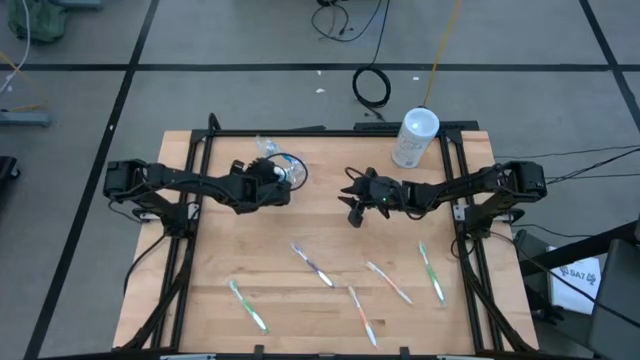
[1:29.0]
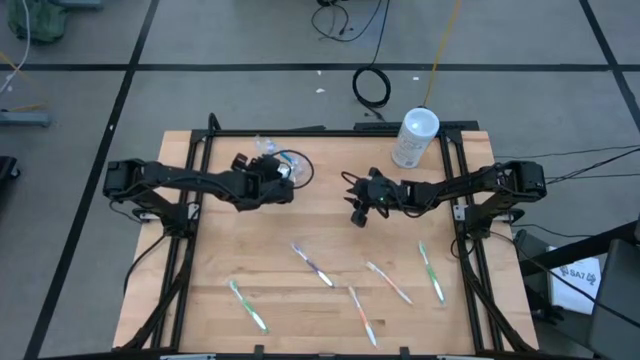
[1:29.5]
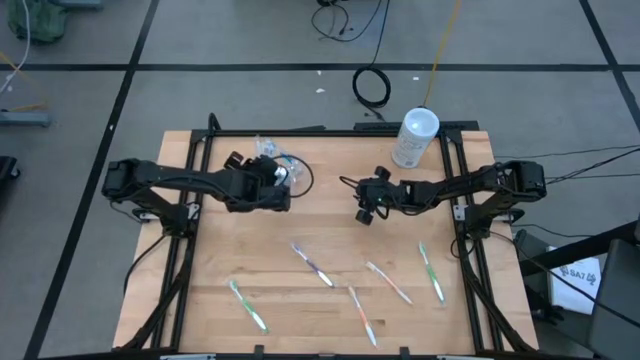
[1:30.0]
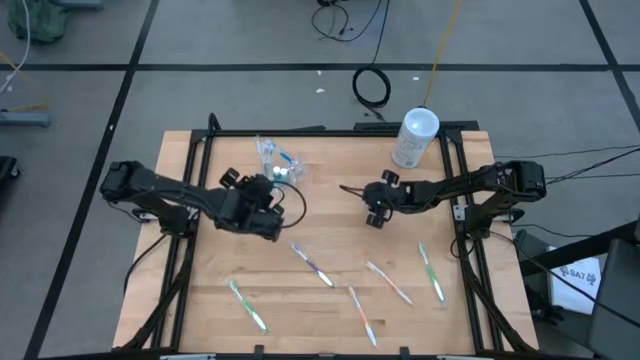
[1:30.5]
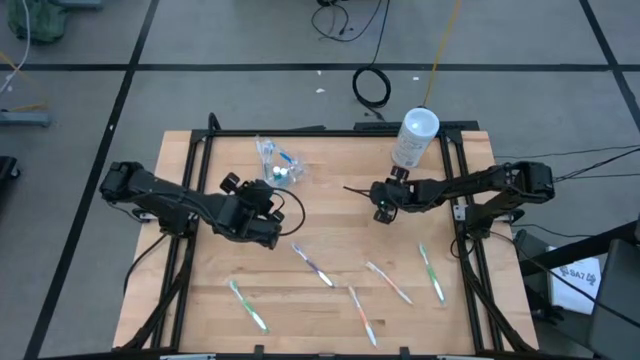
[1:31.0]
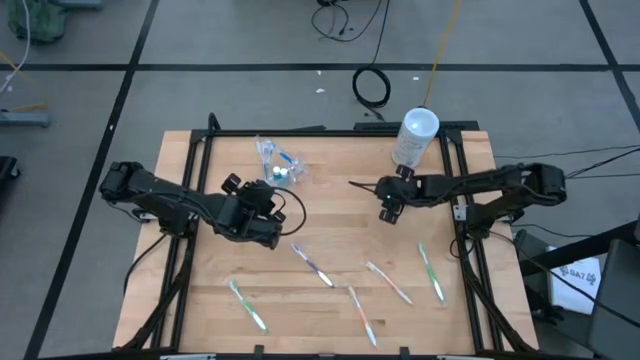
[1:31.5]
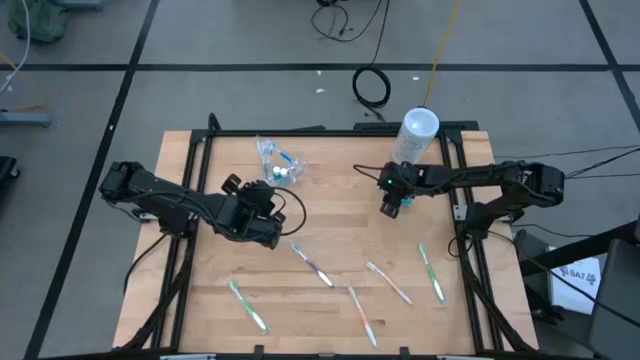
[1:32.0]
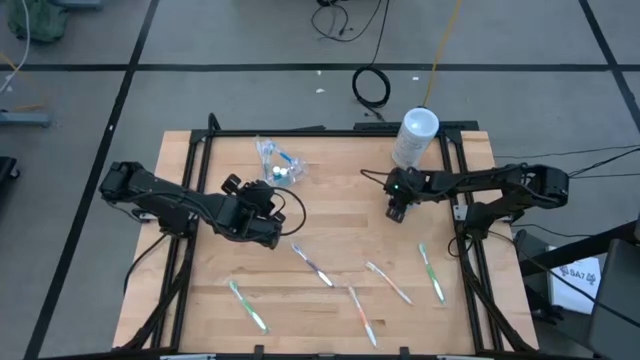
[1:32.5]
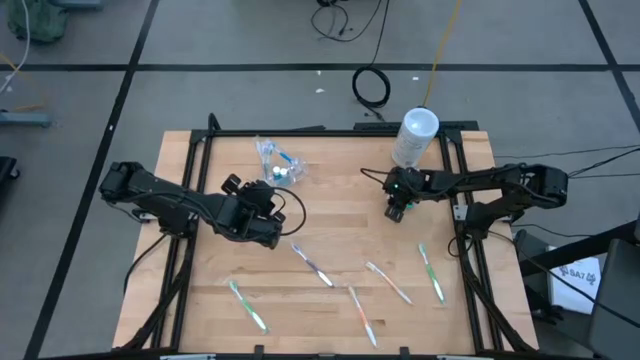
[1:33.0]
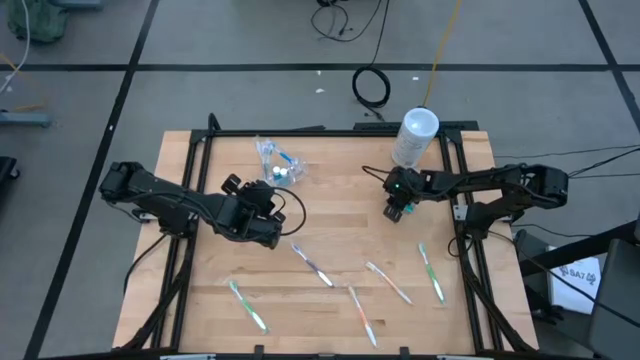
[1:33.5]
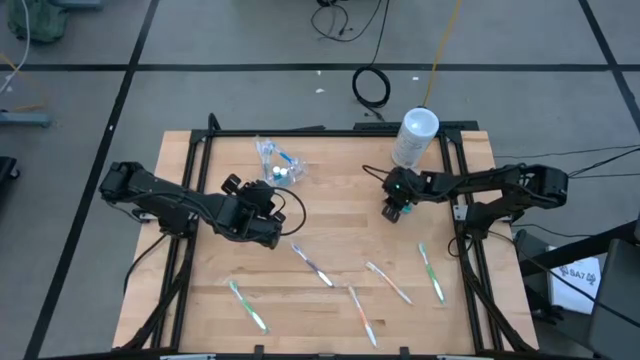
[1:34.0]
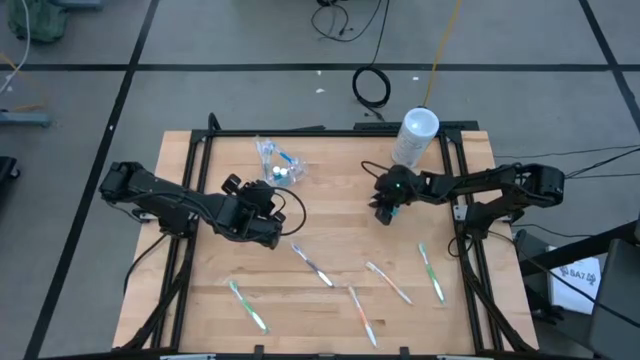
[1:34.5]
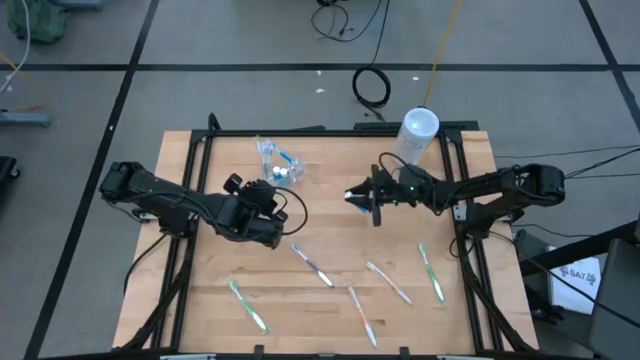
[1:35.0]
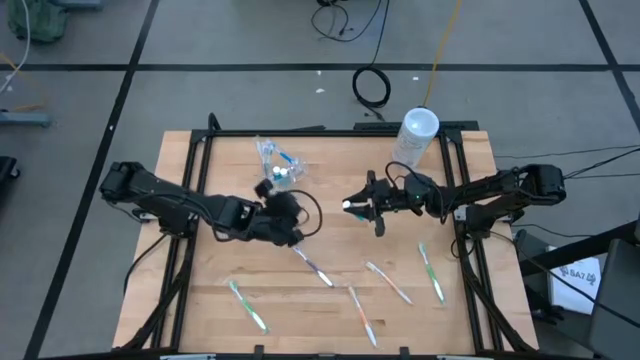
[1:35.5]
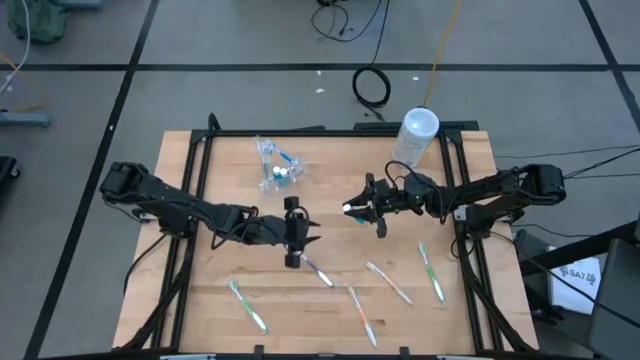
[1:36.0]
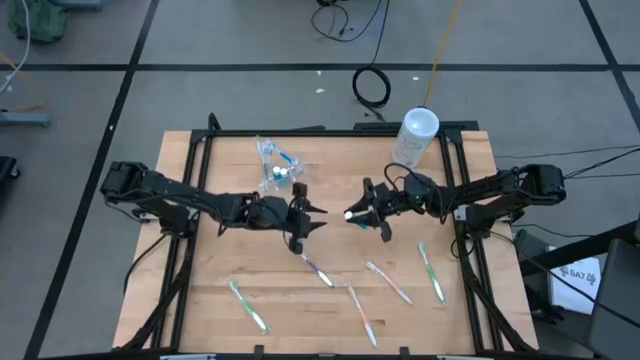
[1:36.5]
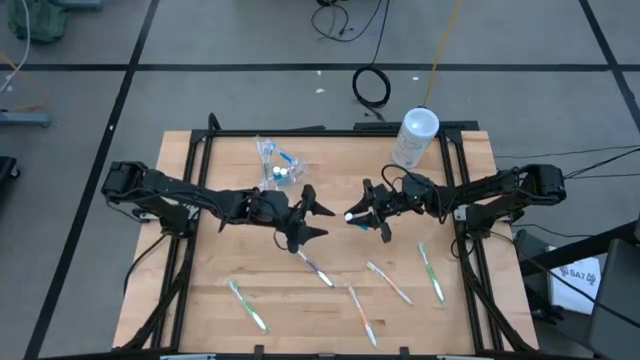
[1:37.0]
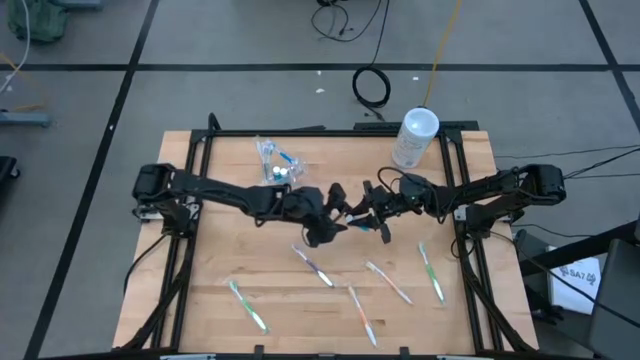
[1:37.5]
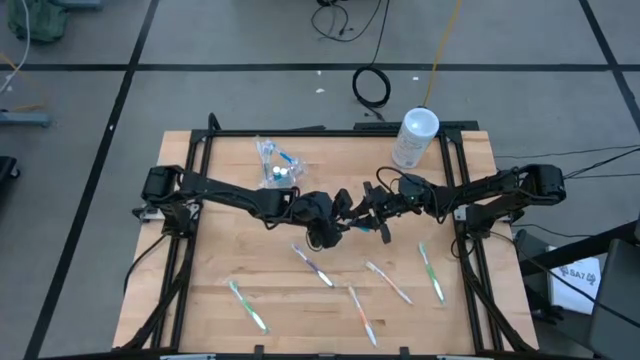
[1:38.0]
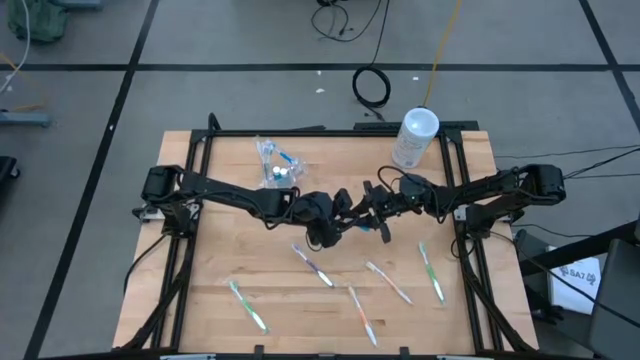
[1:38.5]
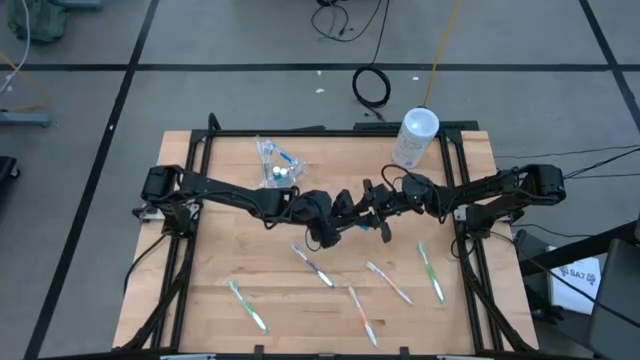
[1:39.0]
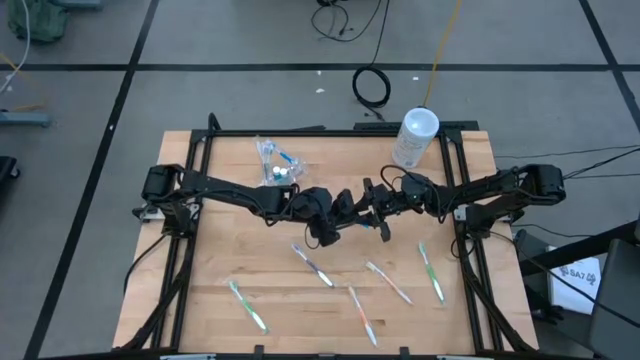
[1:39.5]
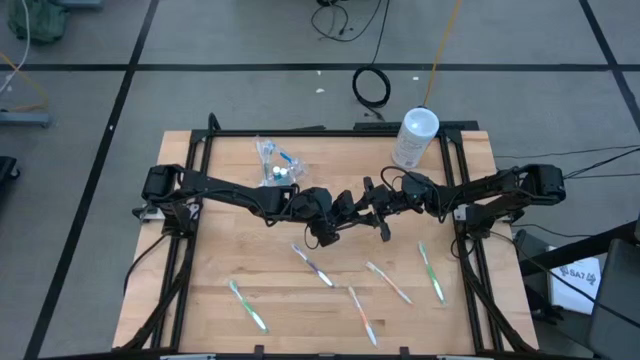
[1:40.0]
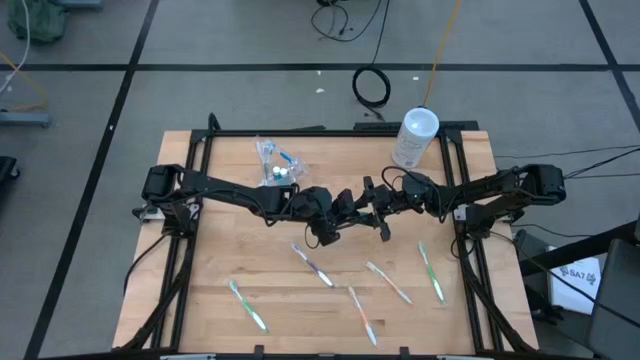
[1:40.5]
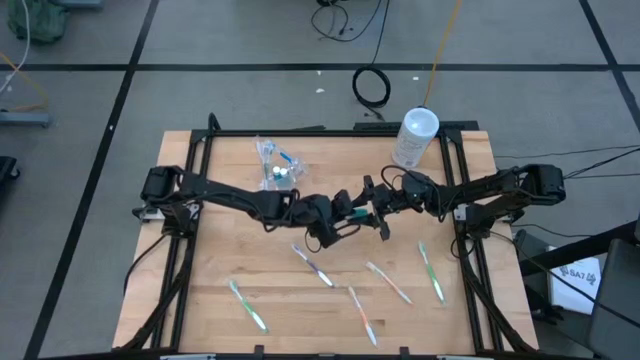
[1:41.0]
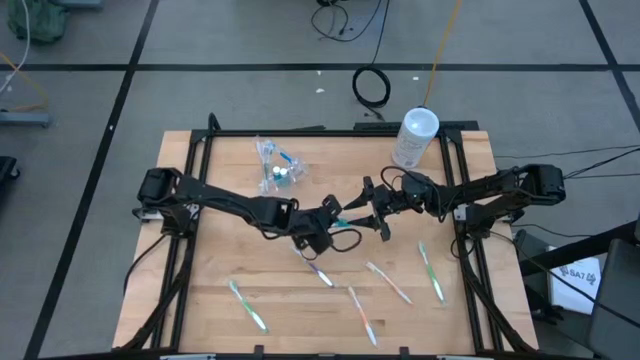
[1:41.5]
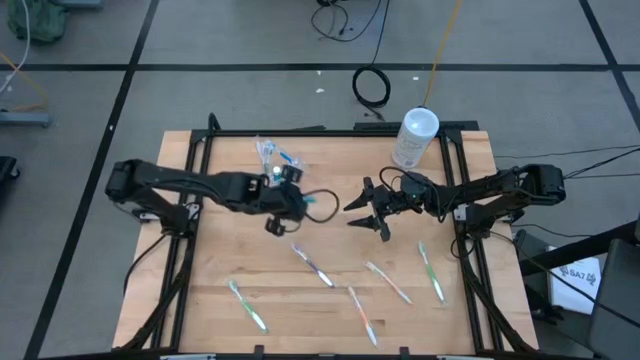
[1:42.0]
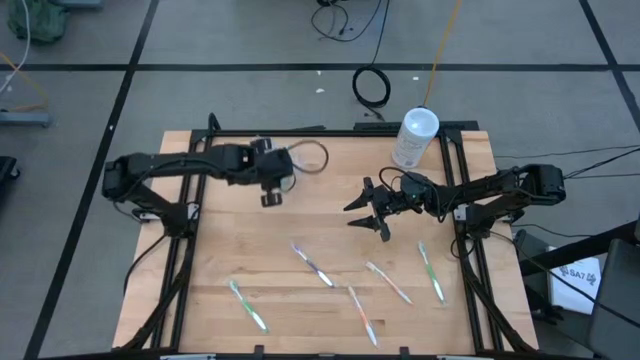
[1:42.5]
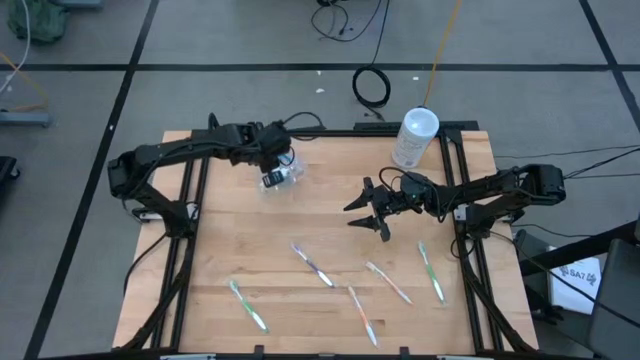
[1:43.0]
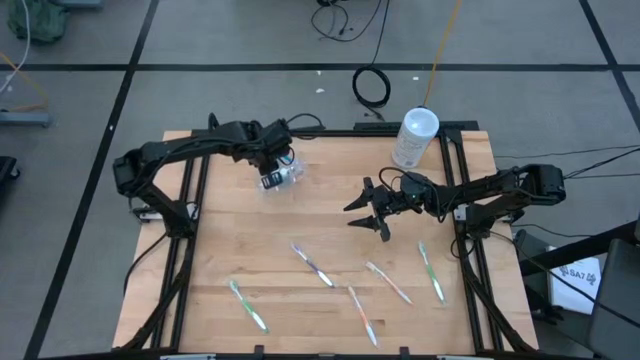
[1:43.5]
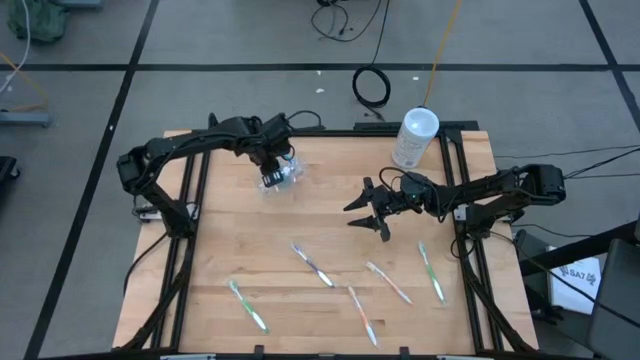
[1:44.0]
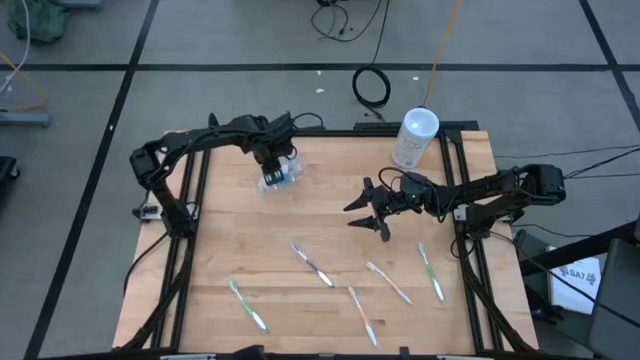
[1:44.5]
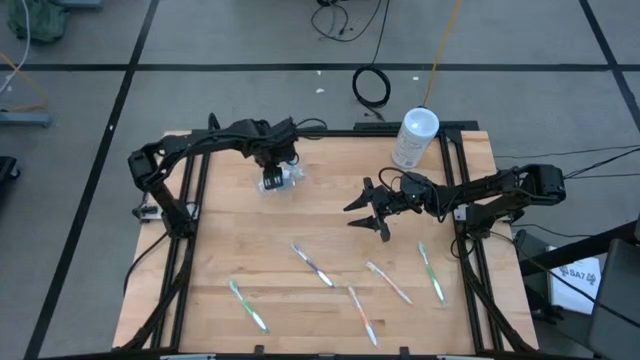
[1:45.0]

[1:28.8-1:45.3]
Task: Pick & Place toothbrushing station
Put the mouthwash into the transparent organizer

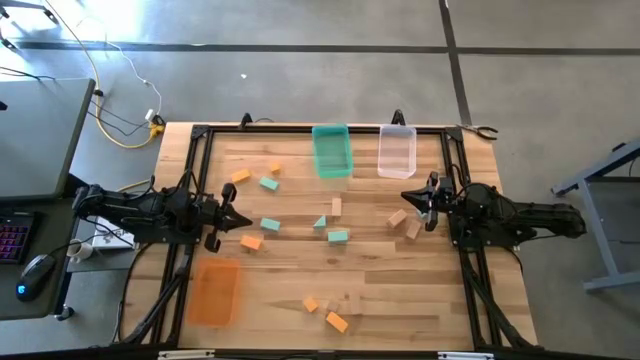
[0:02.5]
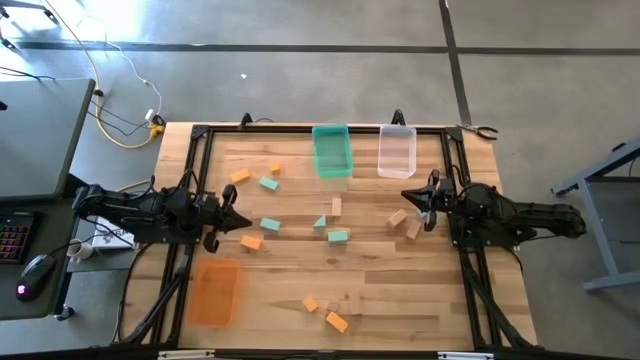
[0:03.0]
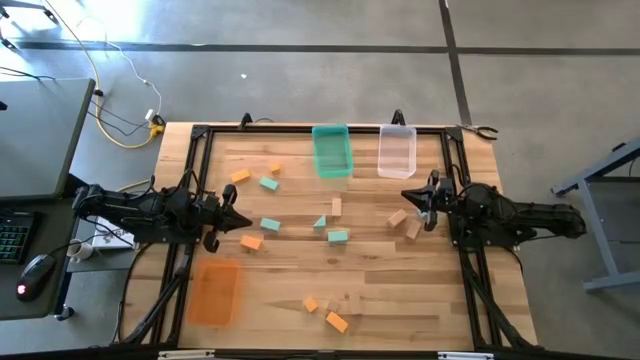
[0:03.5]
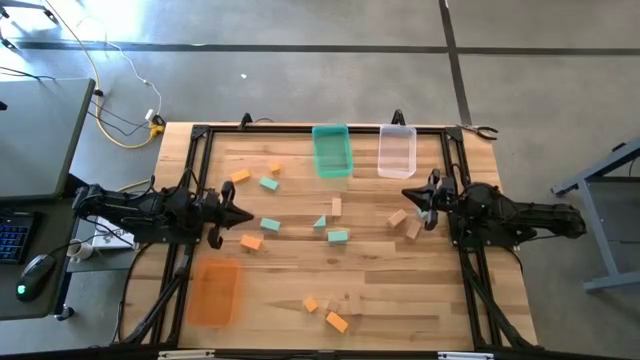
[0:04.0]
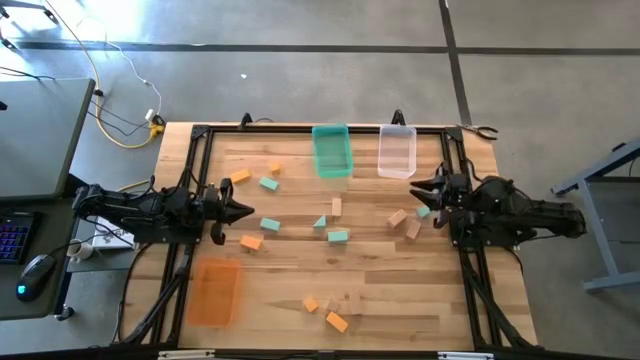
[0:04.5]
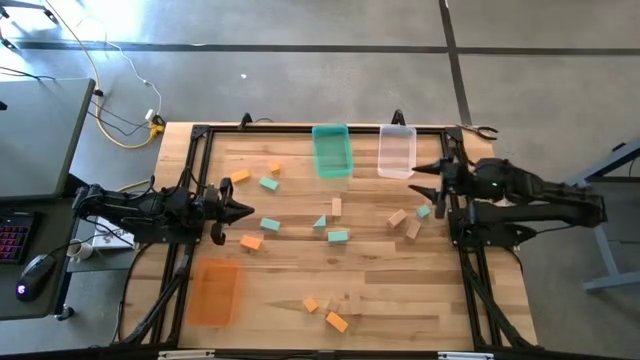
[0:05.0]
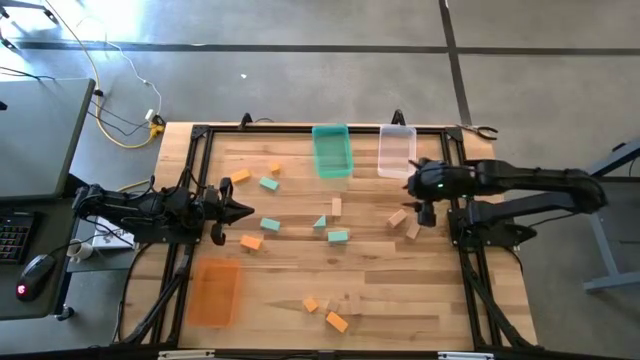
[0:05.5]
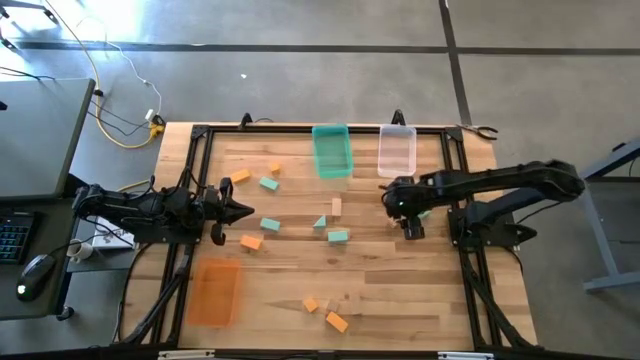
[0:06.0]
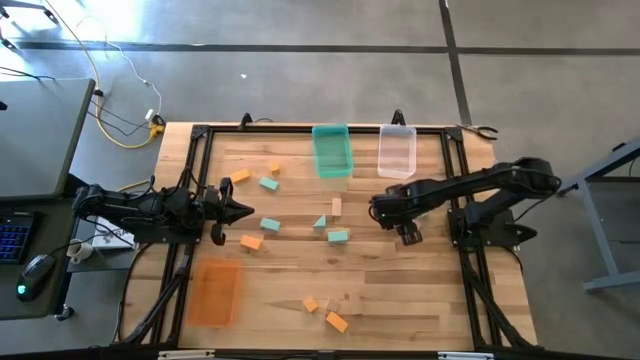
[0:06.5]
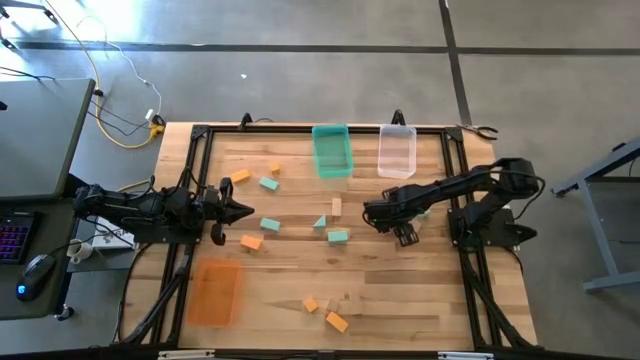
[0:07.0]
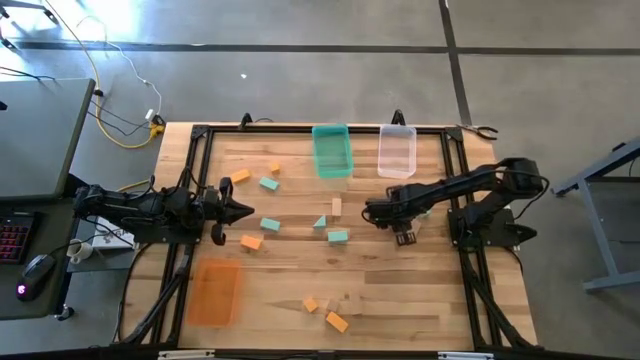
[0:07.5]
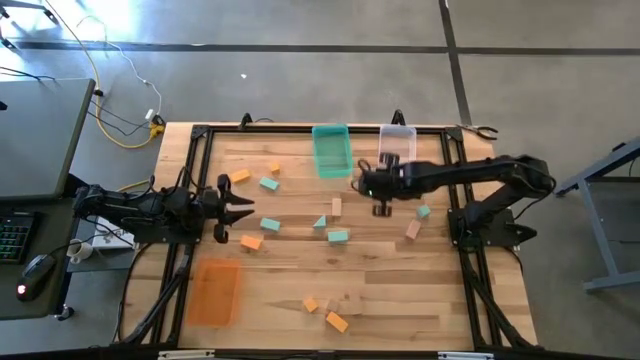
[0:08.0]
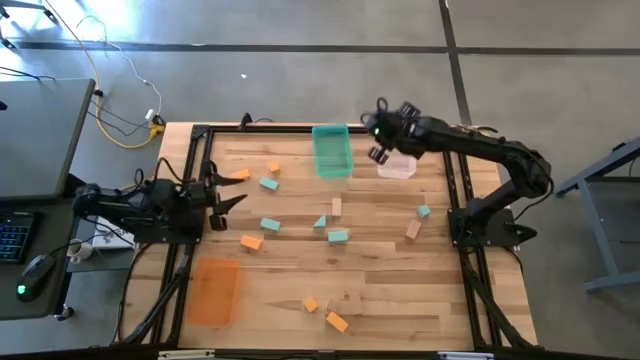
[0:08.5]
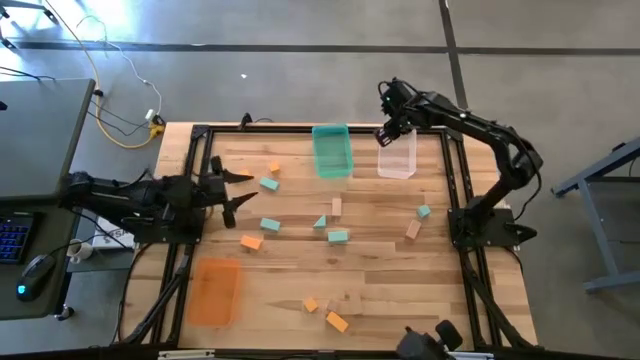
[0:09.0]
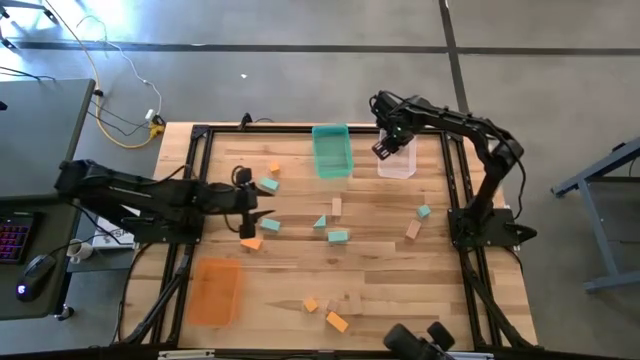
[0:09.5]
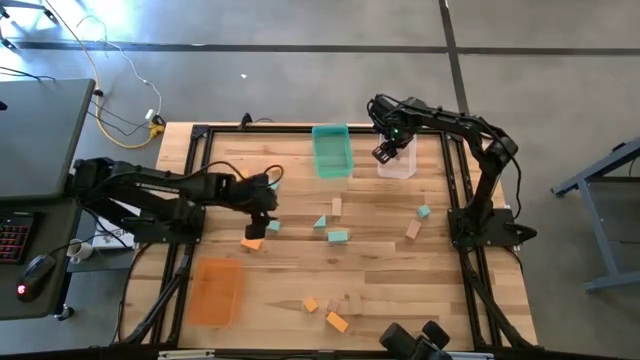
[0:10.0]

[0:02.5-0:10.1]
Task: Sort & place blocks by color
Put the brown block into the transparent bin
